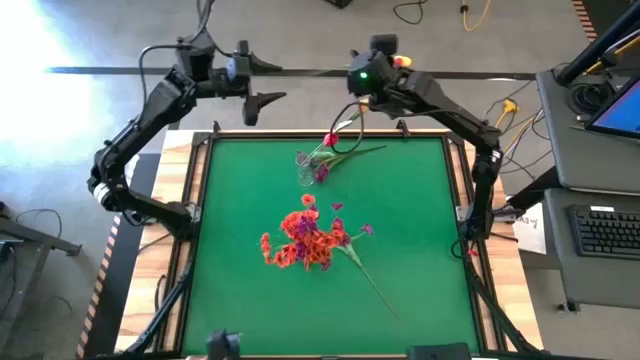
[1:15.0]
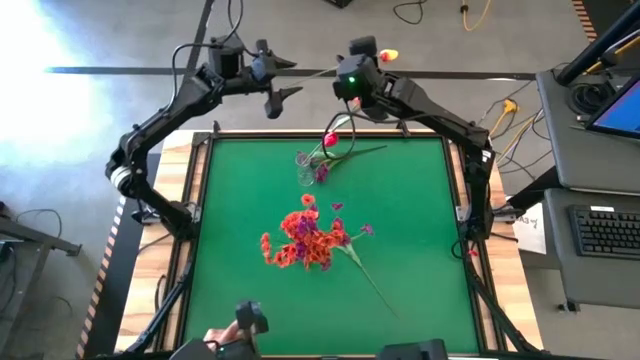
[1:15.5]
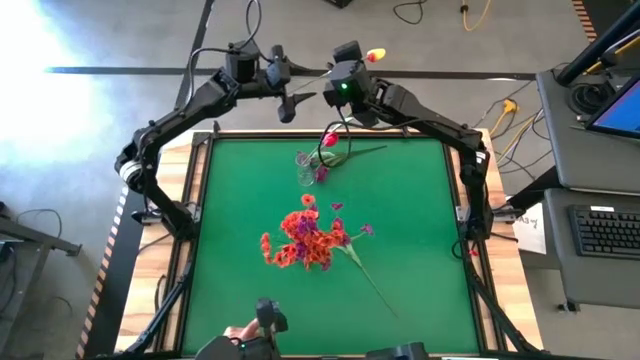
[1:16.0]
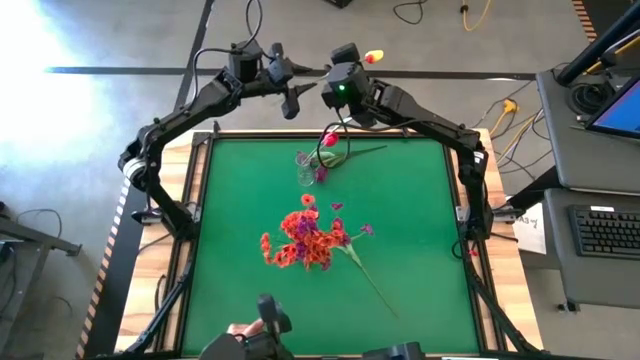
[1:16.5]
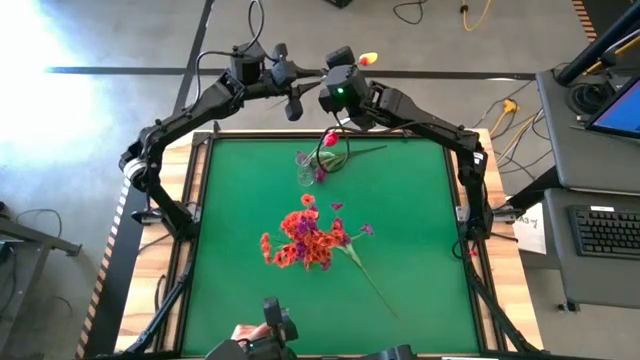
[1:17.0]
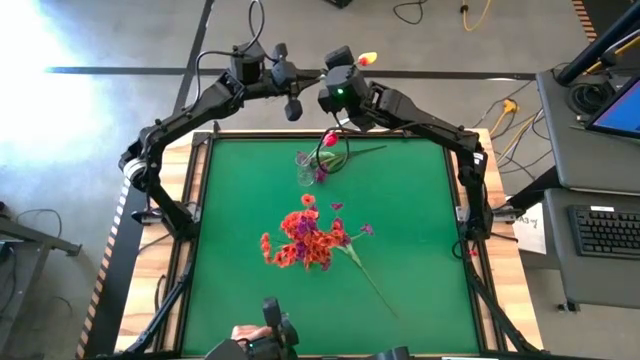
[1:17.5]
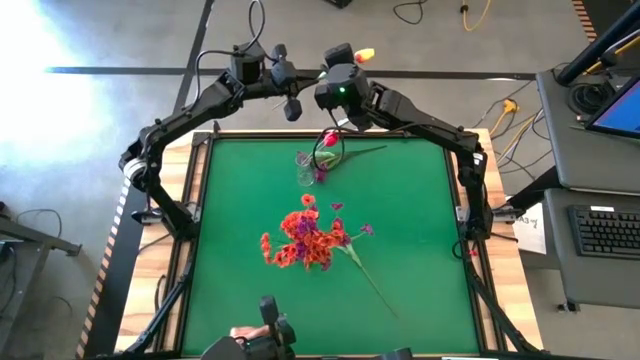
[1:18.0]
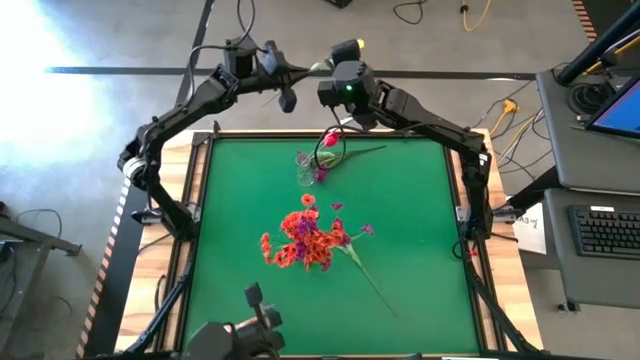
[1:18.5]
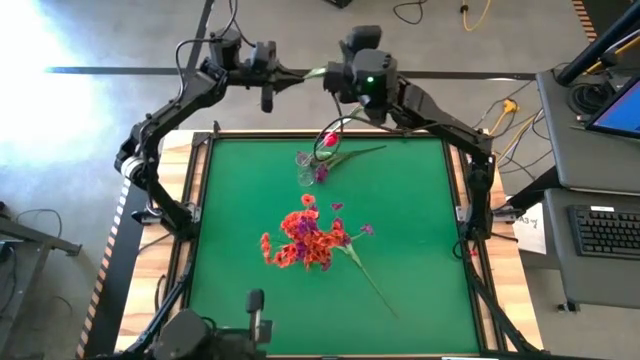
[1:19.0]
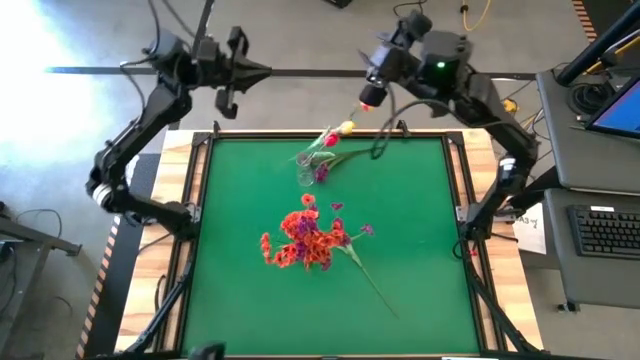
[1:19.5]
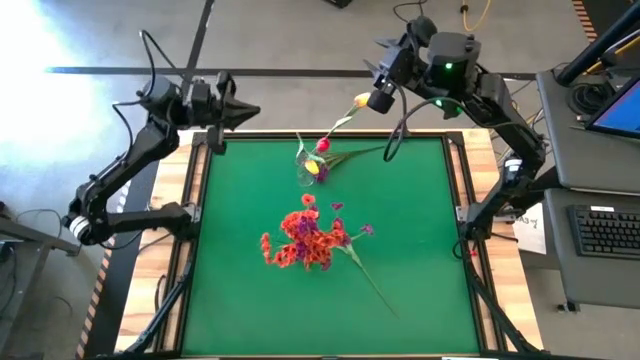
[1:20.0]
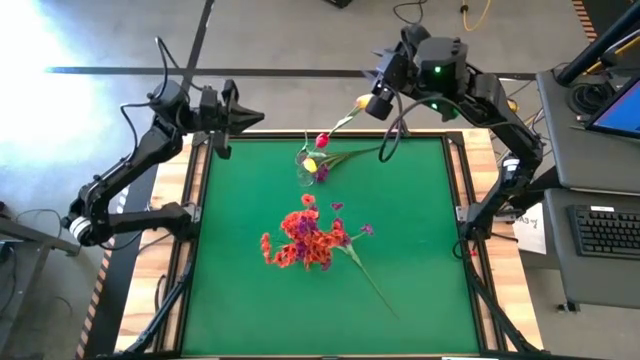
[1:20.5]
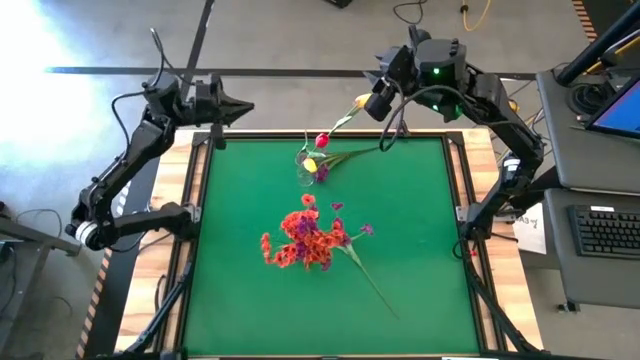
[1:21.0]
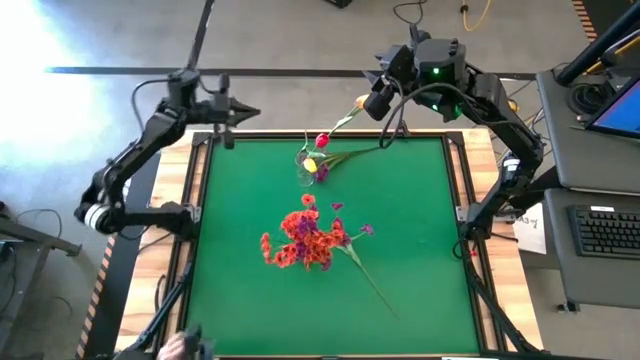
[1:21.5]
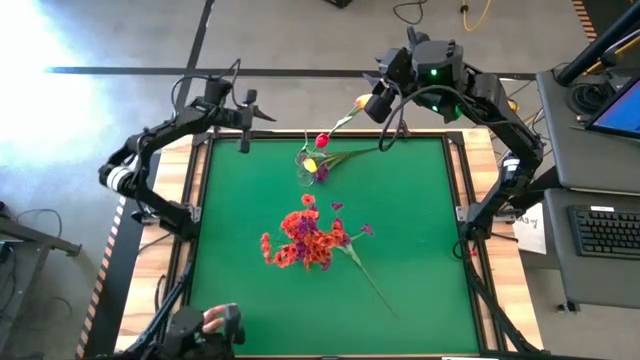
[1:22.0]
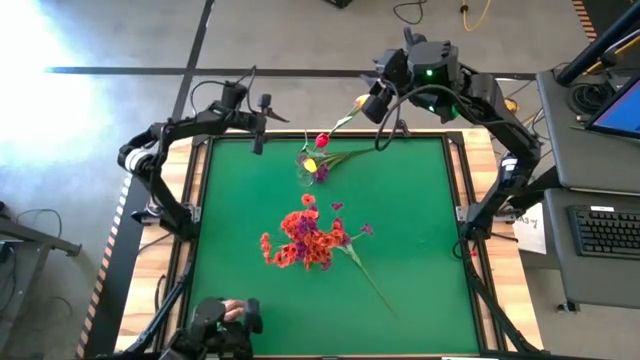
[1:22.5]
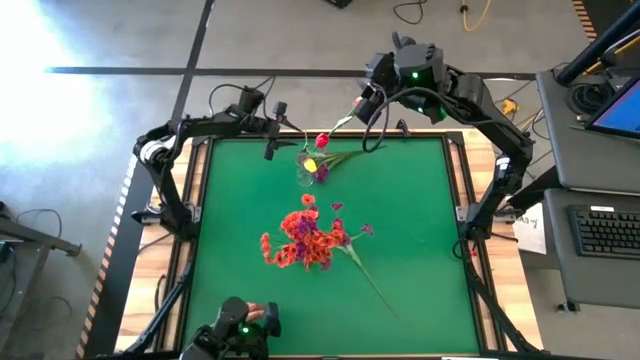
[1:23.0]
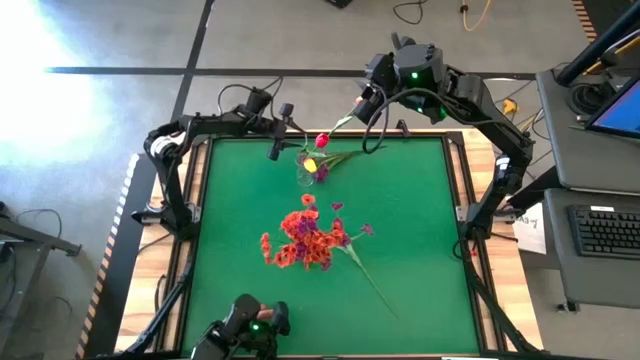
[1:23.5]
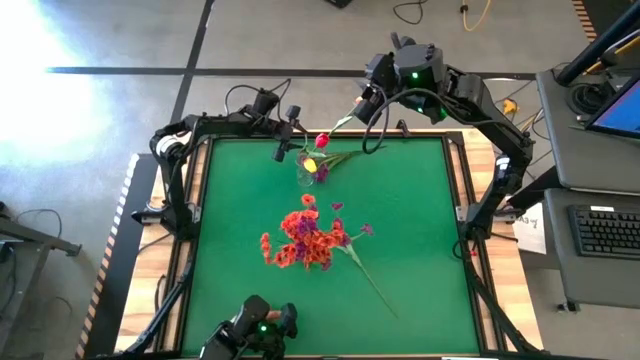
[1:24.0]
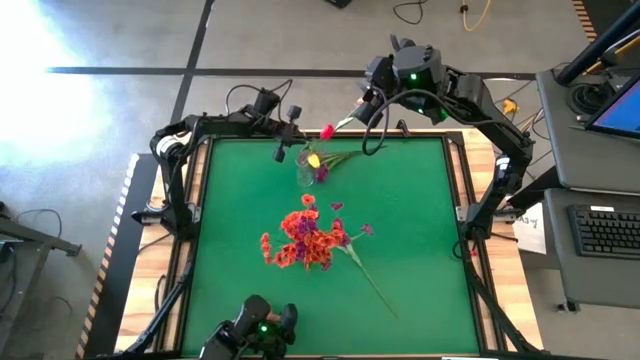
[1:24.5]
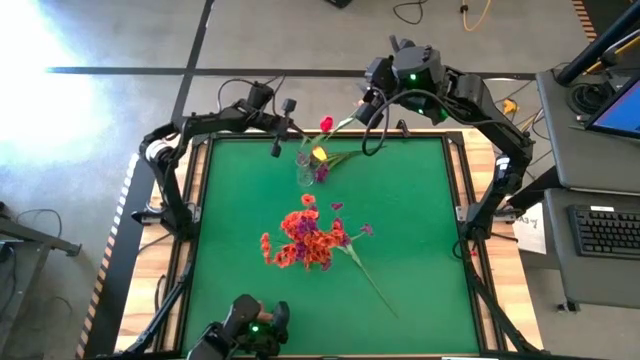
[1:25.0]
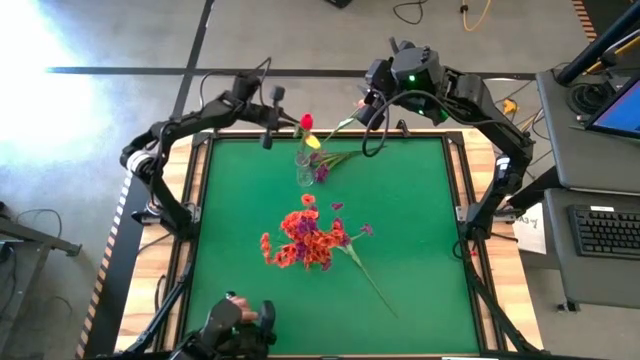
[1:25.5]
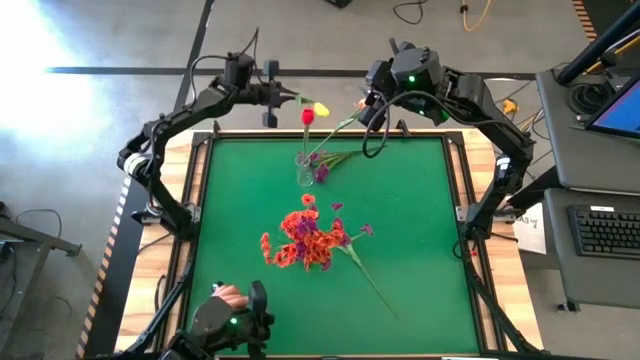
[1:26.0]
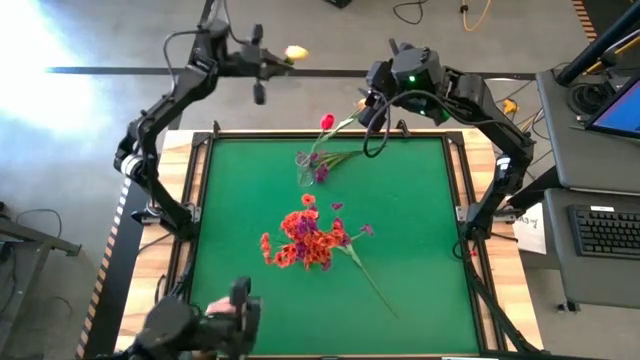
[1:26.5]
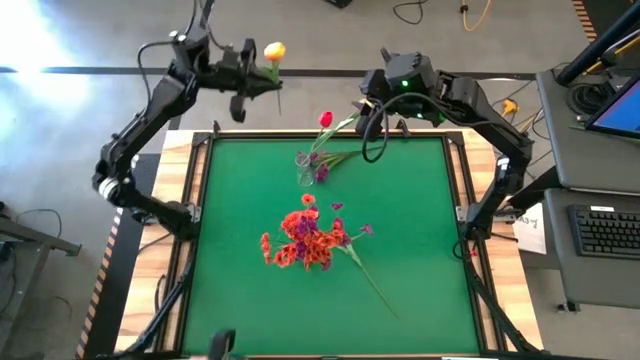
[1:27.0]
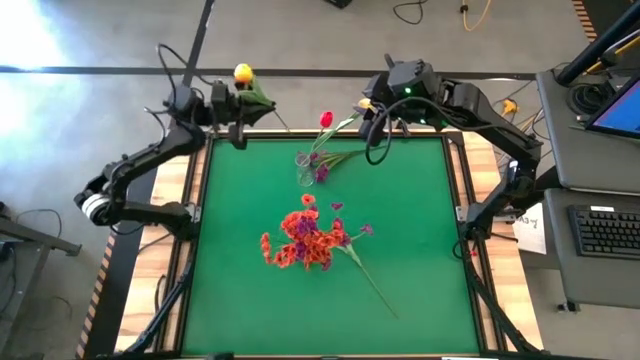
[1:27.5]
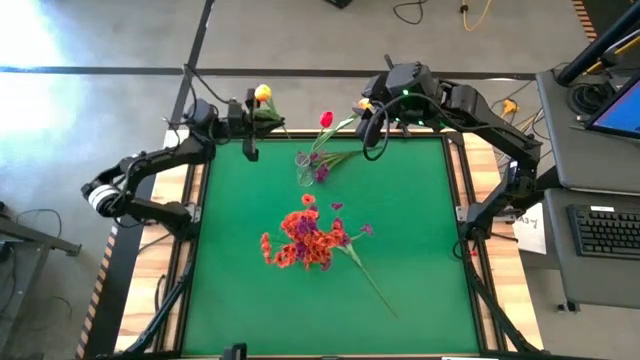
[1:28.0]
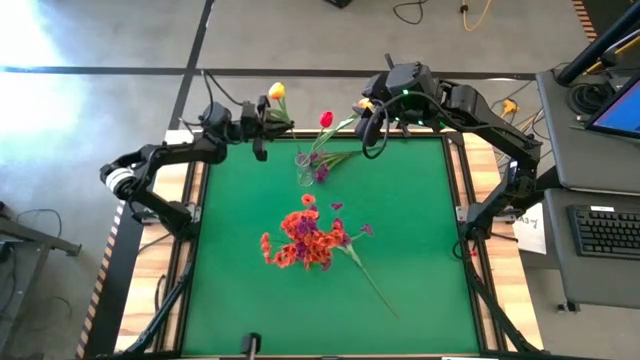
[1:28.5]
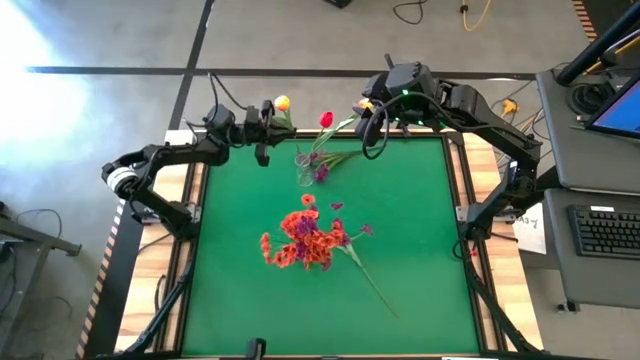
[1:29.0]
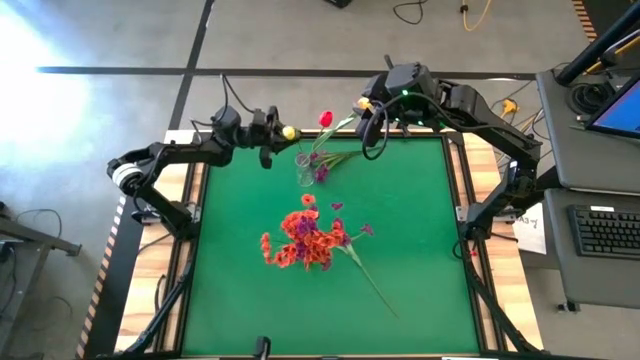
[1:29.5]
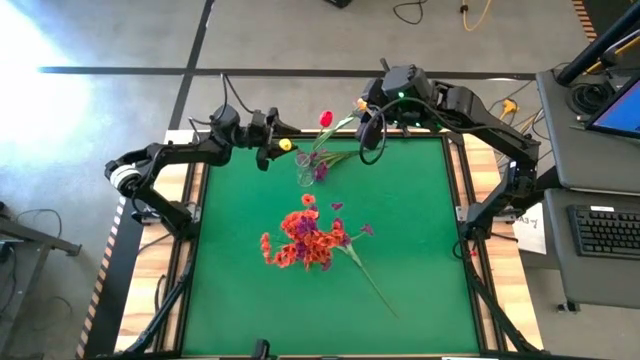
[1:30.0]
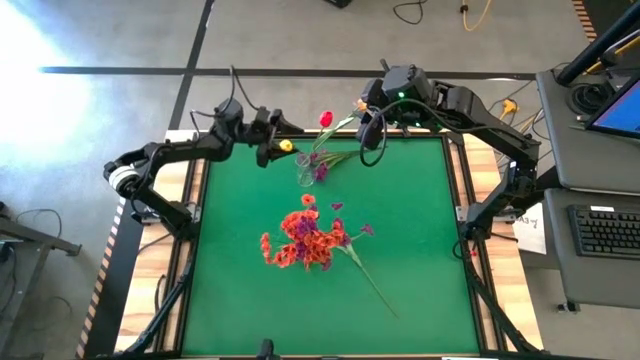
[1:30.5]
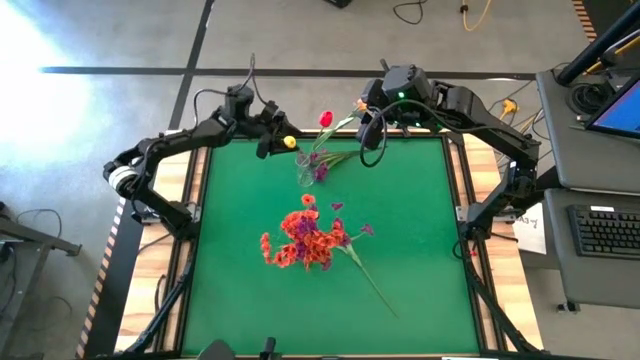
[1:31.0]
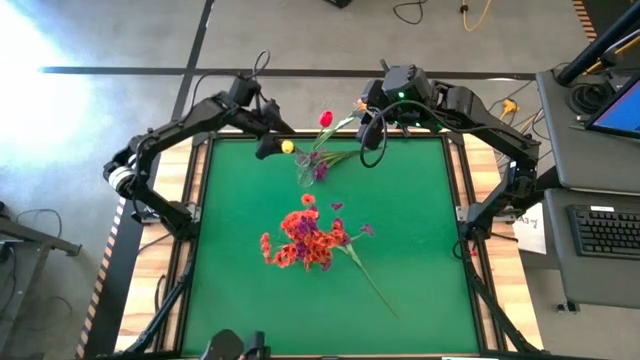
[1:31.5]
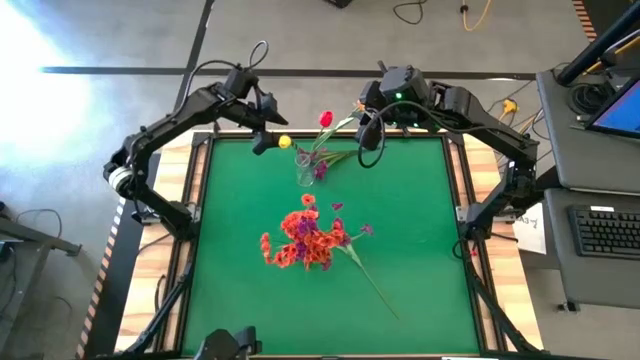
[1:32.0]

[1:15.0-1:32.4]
Task: Sort flowers into vase by color
Put the yellow tulip into the transparent vase

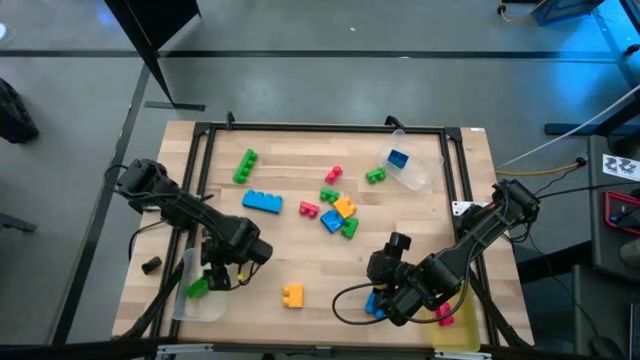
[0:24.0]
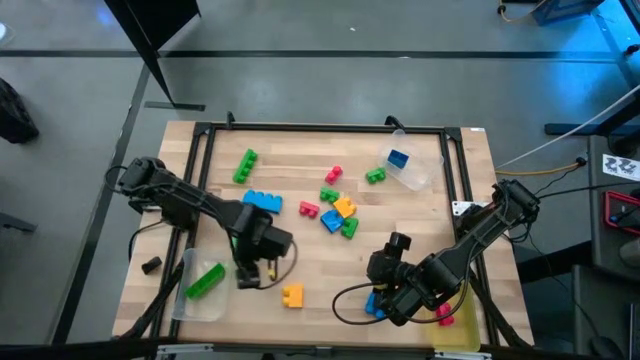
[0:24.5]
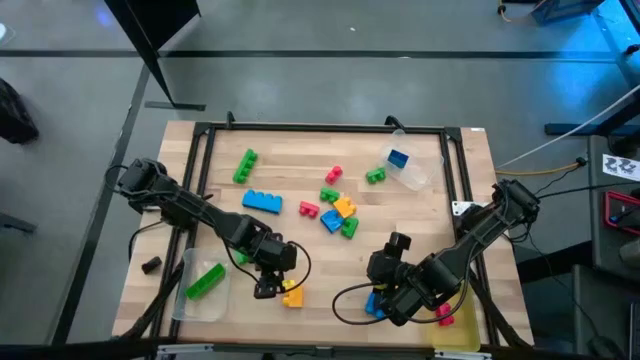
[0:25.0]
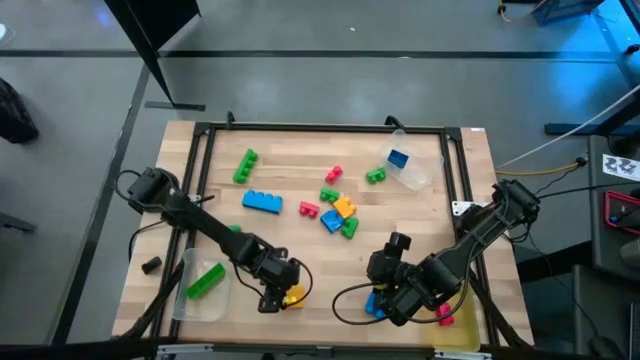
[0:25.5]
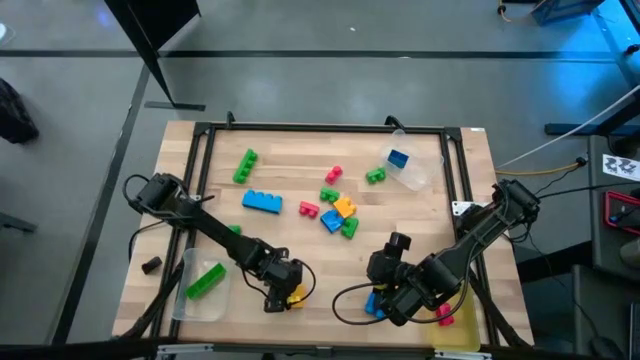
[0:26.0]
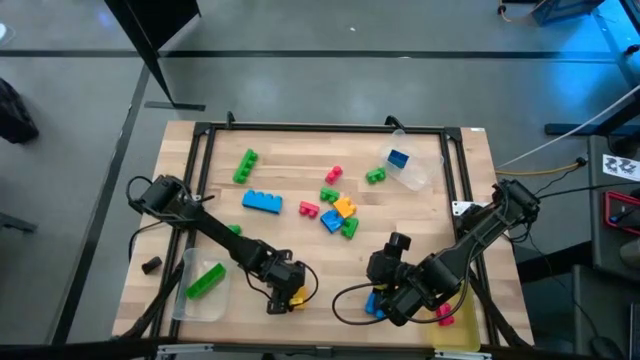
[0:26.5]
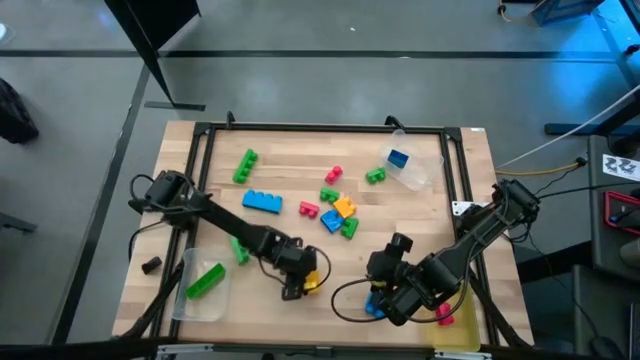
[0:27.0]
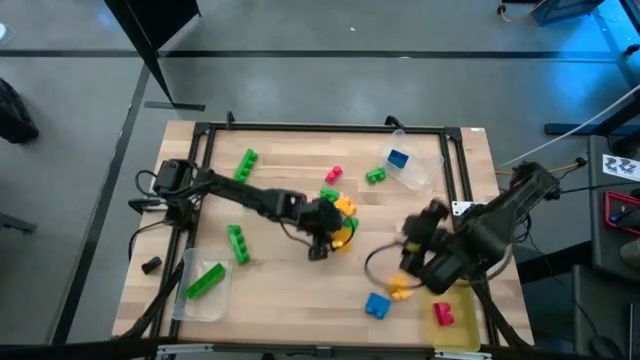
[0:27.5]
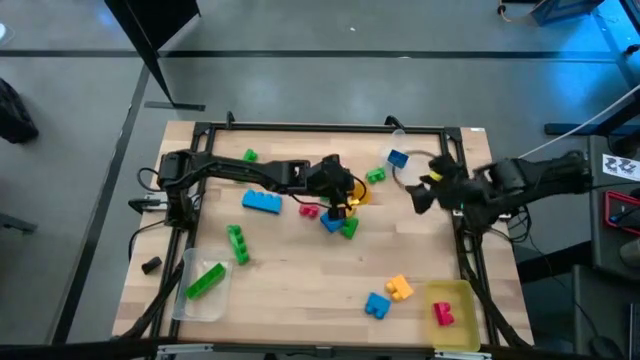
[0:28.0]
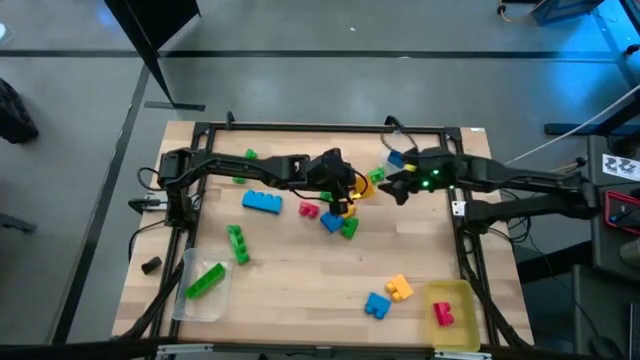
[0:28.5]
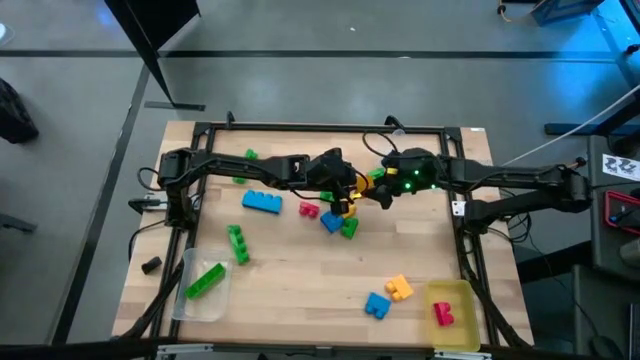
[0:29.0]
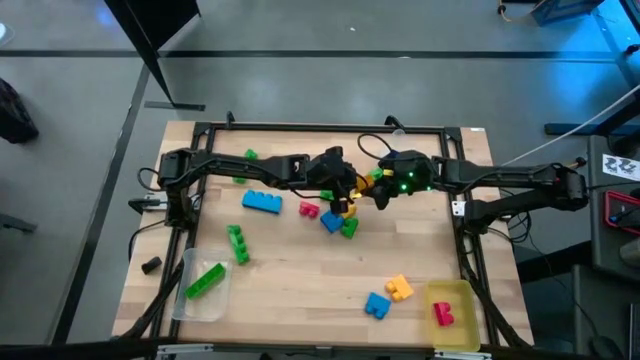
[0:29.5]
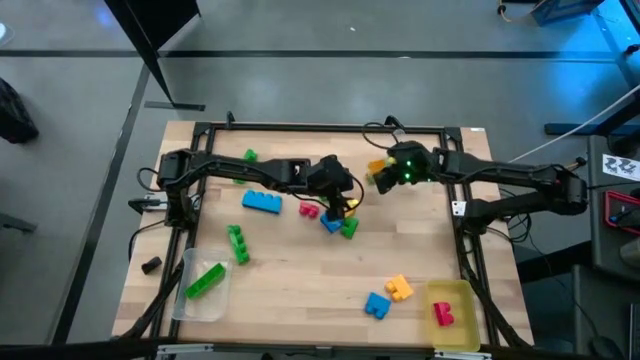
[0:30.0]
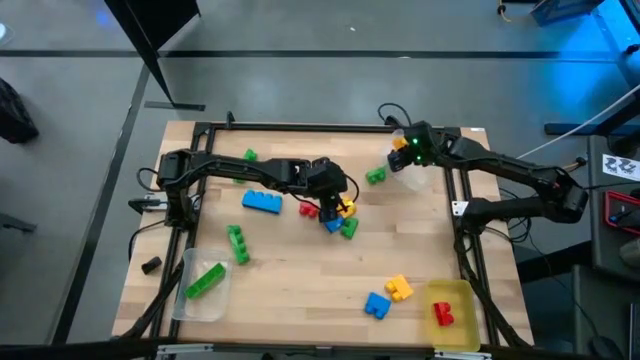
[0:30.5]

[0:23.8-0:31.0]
Task: Sort blocks by size
Put the bottom left 2 stud yellow game piece into the top transparent bin
